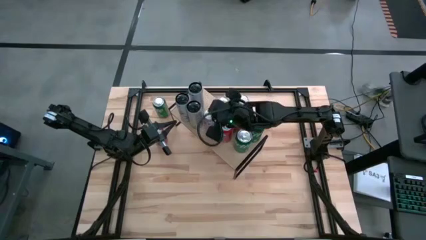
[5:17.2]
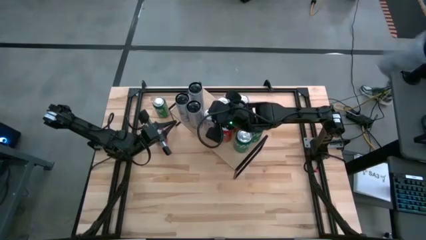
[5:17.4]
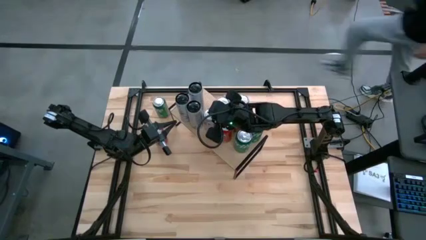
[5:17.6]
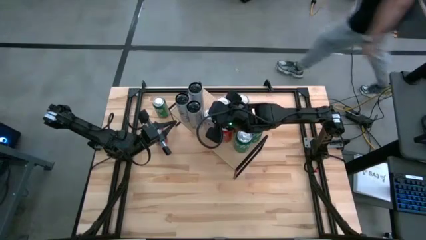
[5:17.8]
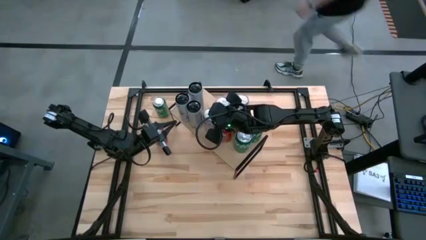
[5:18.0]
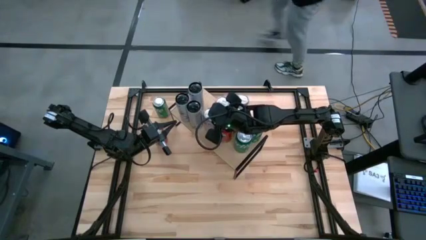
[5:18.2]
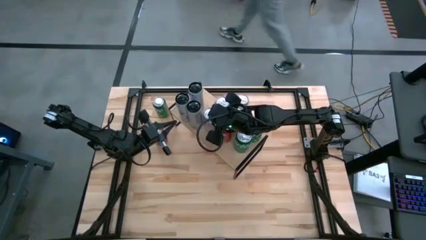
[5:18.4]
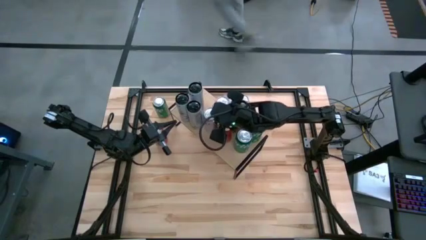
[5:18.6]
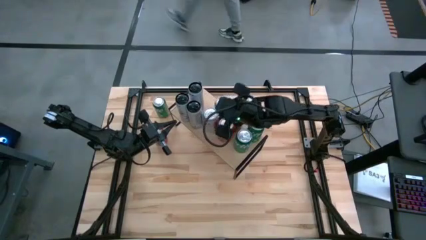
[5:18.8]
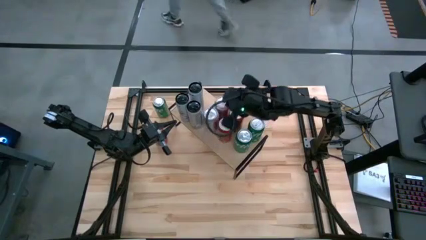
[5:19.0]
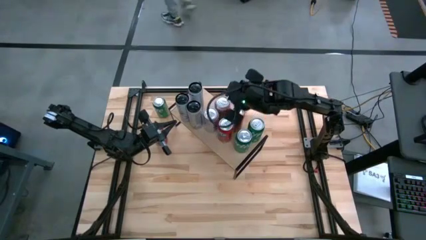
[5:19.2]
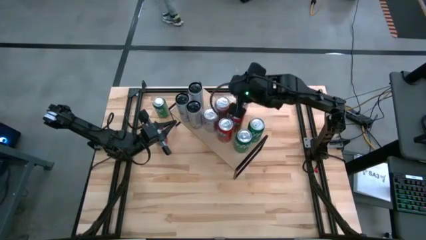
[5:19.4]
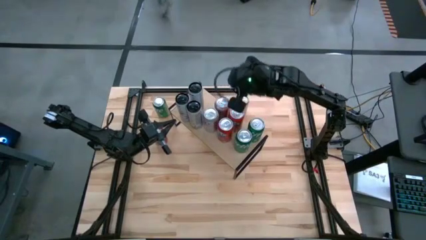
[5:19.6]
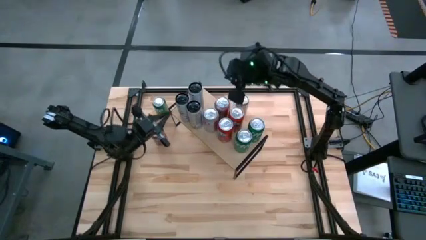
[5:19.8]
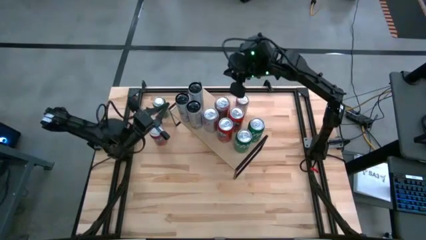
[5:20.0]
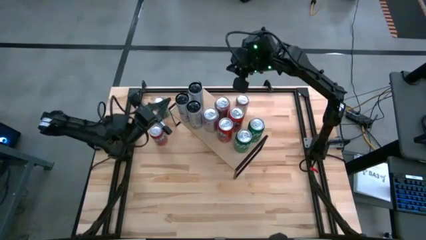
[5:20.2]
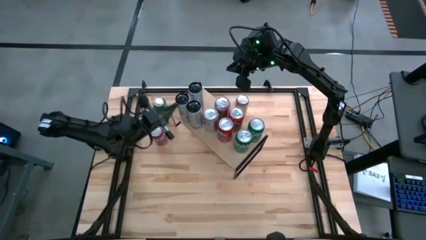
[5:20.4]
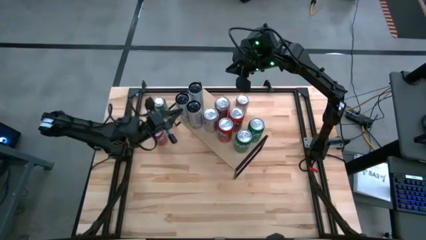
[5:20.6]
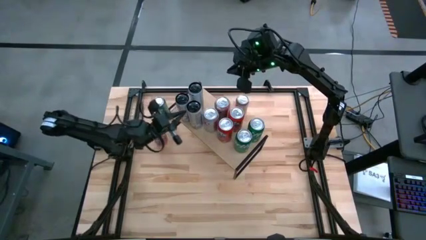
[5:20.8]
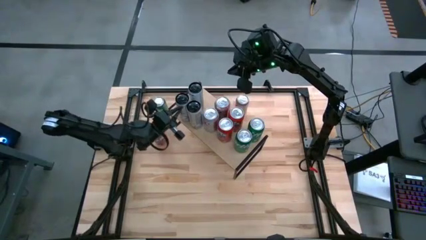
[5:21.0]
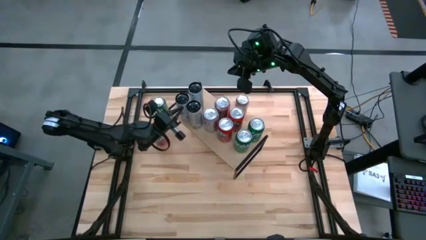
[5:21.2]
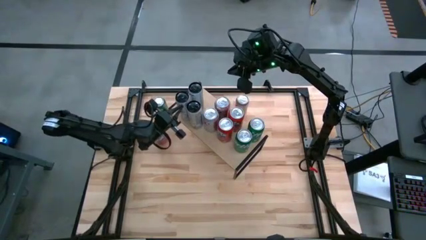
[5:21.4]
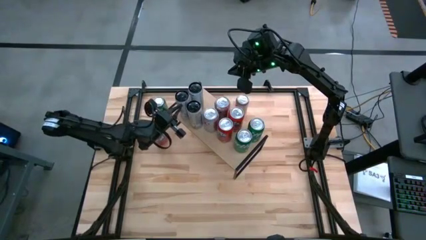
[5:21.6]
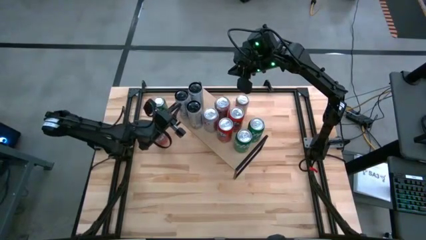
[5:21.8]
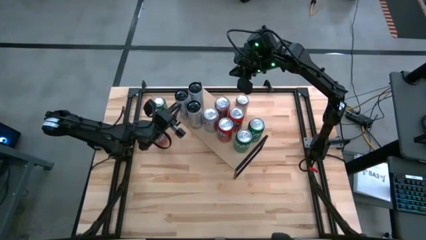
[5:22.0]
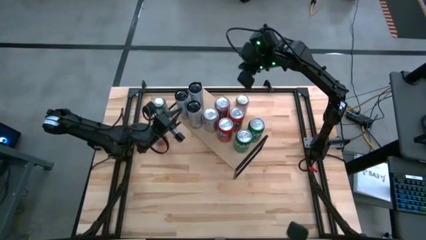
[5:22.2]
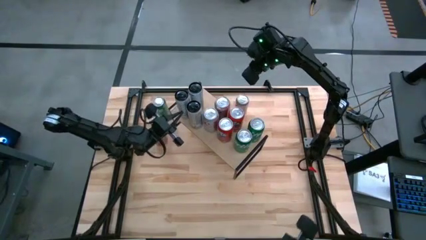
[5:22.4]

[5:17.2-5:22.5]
Task: Place canned beverage on shelf
Adjust the blue soda can

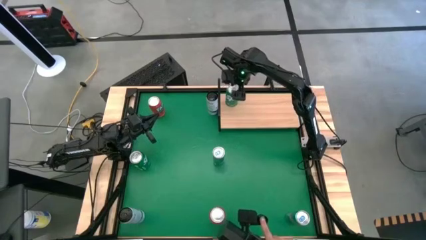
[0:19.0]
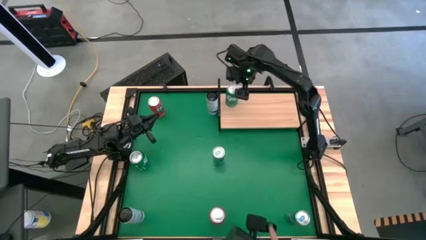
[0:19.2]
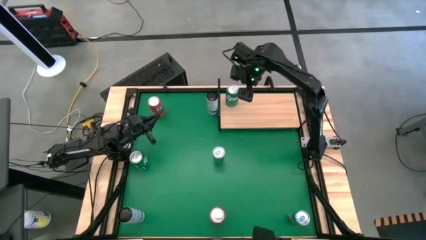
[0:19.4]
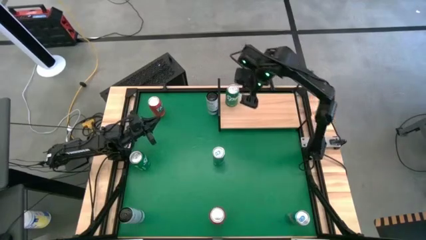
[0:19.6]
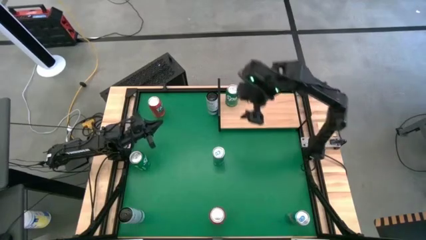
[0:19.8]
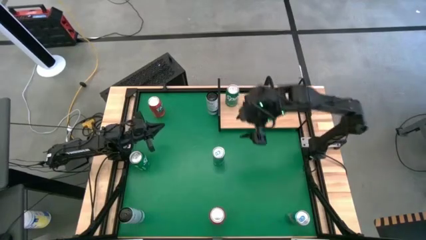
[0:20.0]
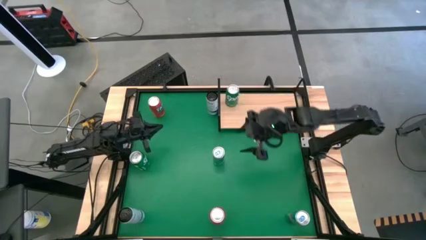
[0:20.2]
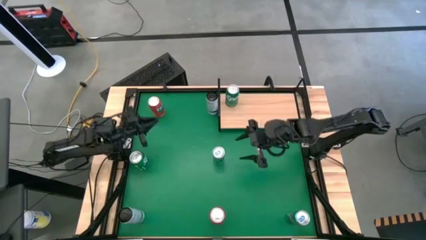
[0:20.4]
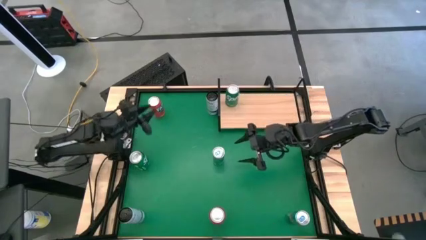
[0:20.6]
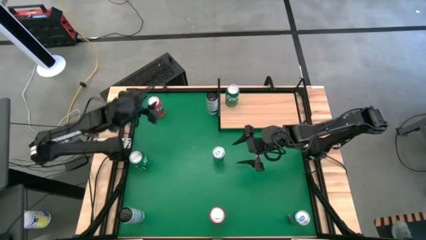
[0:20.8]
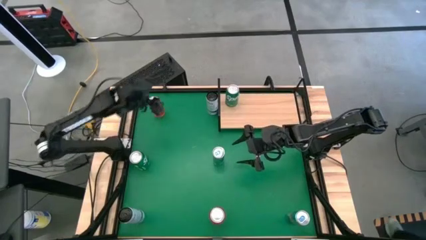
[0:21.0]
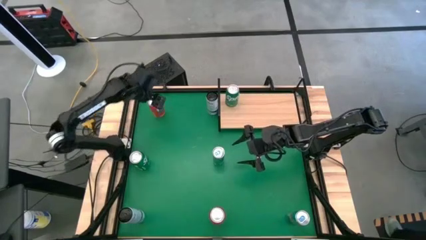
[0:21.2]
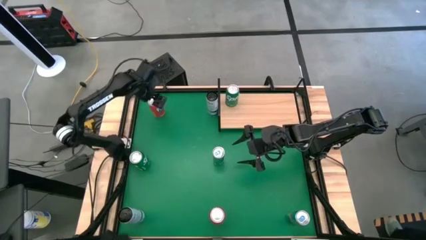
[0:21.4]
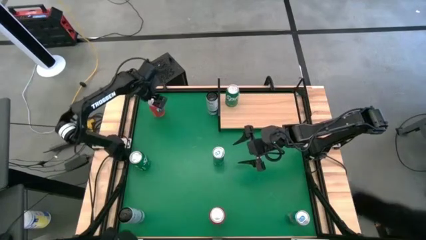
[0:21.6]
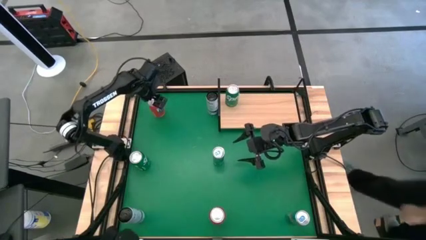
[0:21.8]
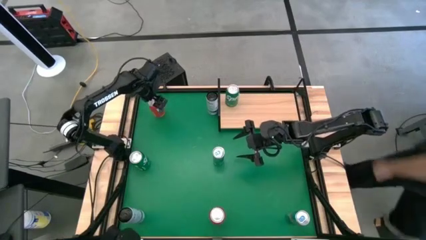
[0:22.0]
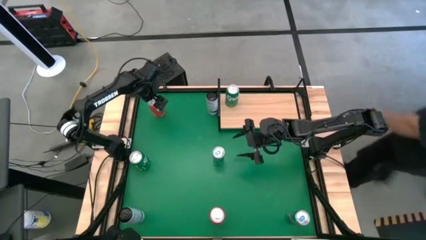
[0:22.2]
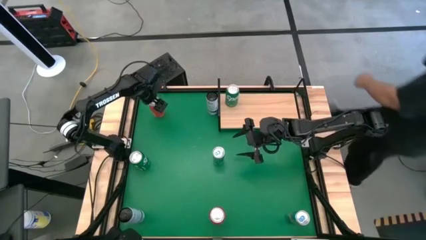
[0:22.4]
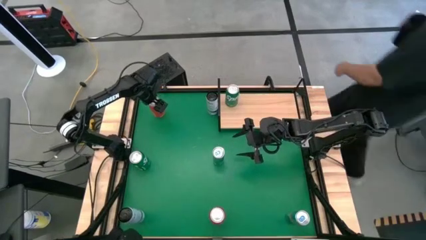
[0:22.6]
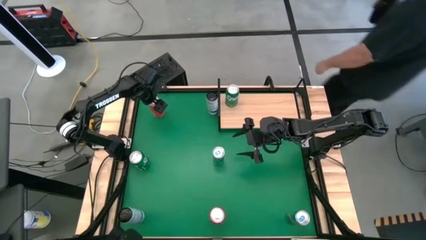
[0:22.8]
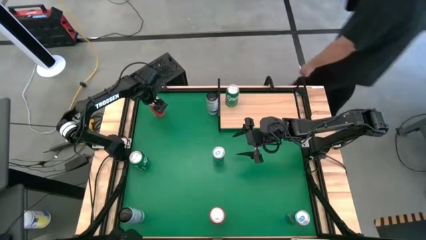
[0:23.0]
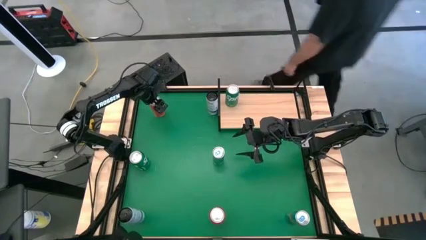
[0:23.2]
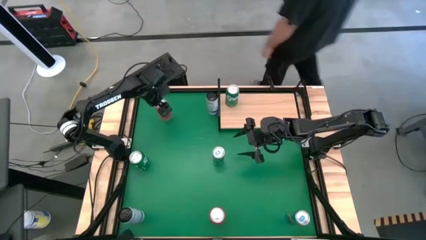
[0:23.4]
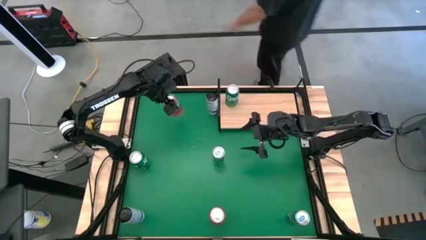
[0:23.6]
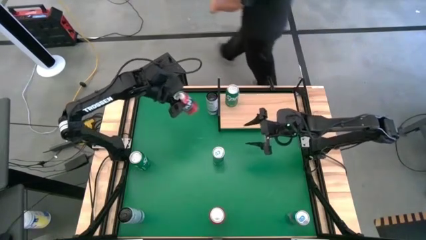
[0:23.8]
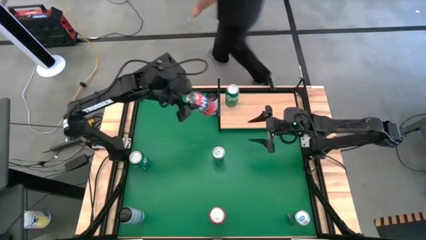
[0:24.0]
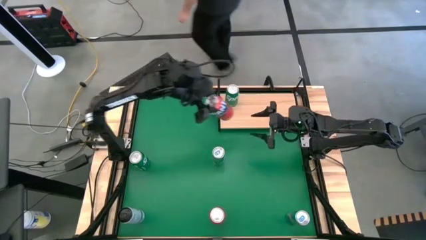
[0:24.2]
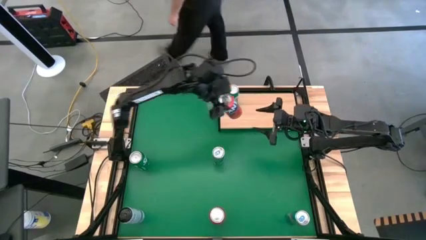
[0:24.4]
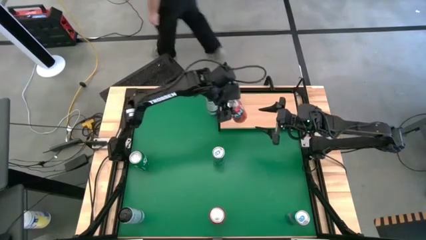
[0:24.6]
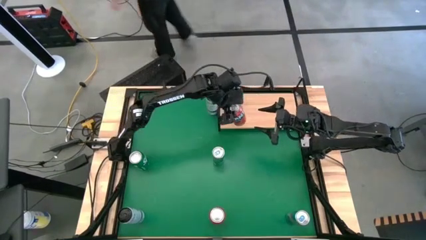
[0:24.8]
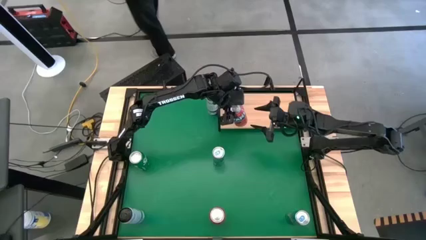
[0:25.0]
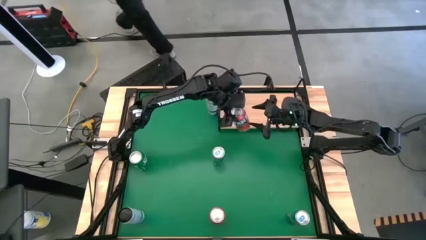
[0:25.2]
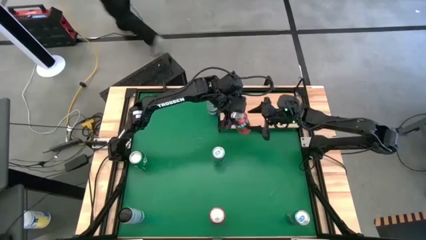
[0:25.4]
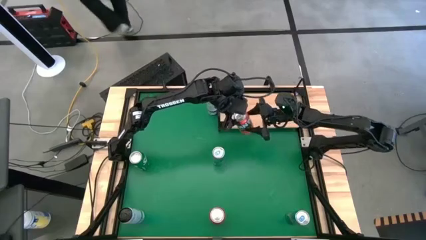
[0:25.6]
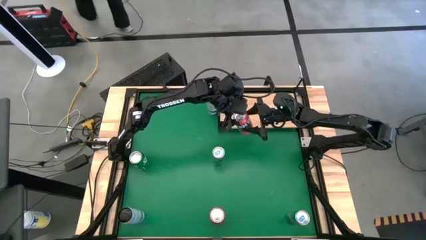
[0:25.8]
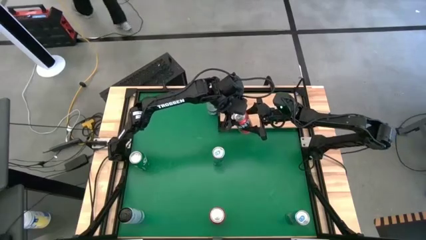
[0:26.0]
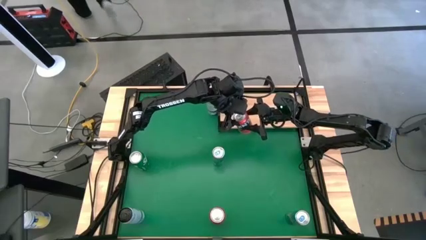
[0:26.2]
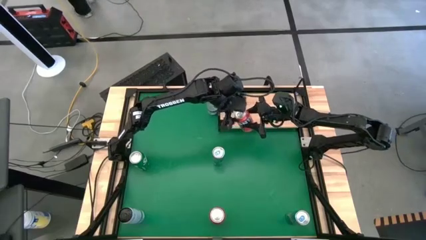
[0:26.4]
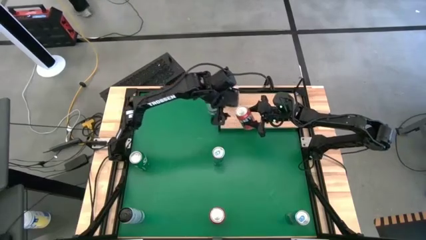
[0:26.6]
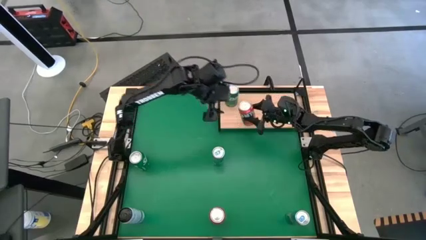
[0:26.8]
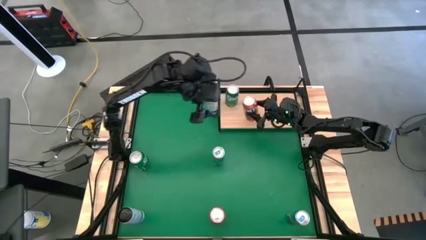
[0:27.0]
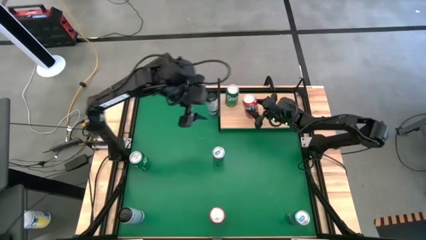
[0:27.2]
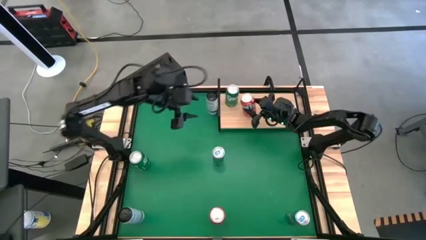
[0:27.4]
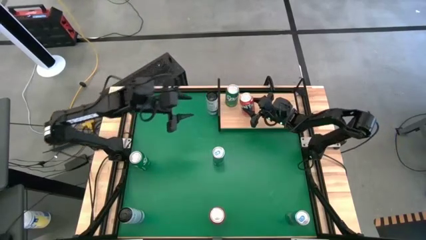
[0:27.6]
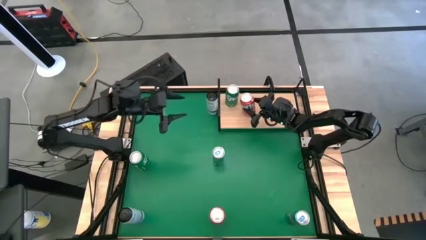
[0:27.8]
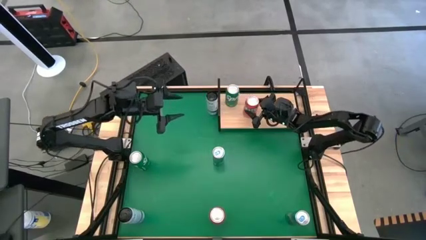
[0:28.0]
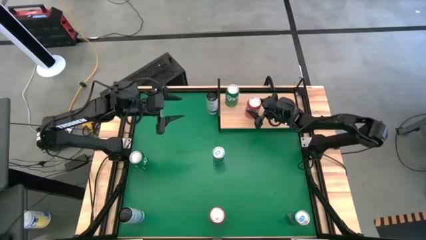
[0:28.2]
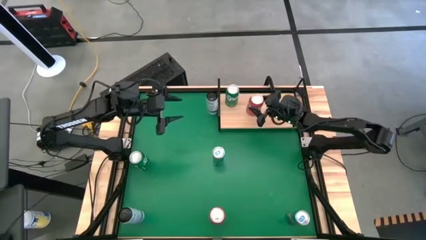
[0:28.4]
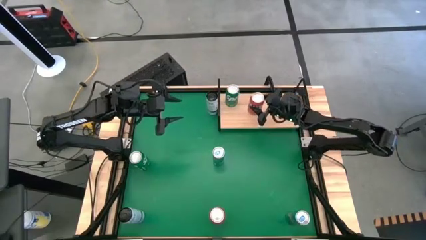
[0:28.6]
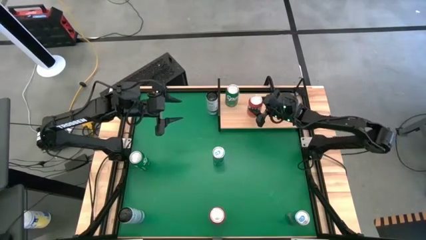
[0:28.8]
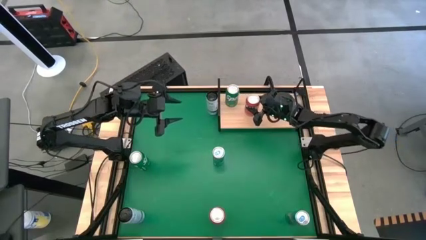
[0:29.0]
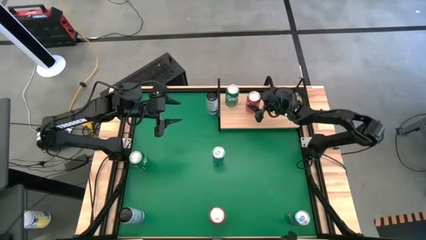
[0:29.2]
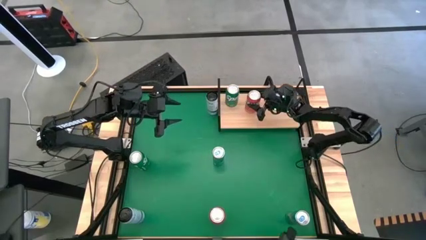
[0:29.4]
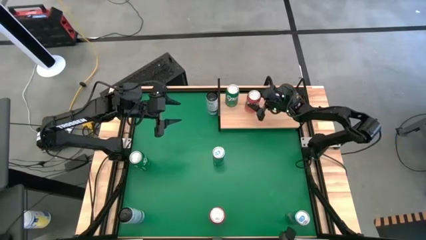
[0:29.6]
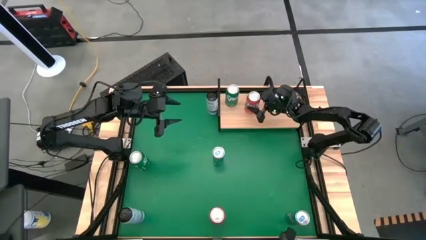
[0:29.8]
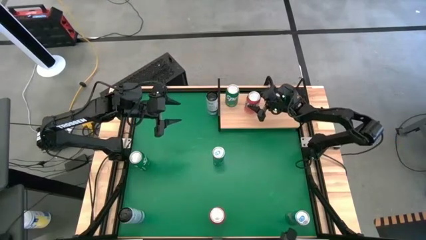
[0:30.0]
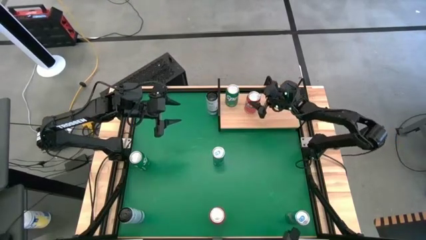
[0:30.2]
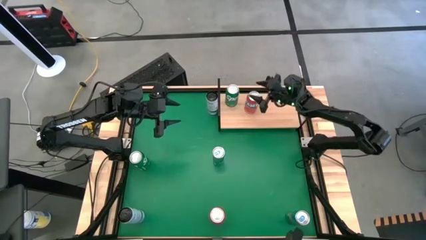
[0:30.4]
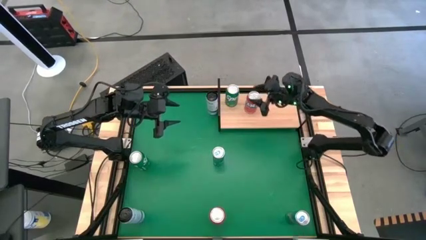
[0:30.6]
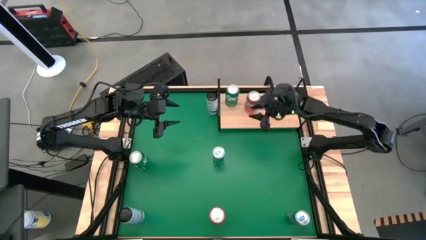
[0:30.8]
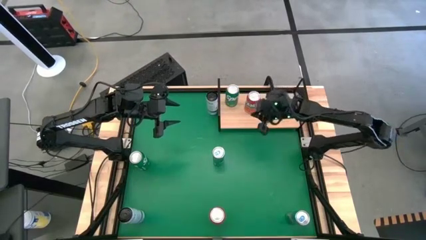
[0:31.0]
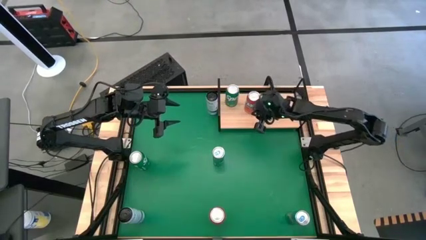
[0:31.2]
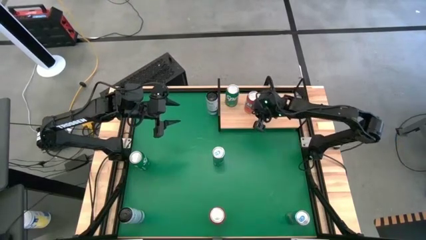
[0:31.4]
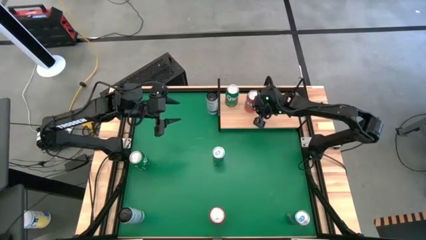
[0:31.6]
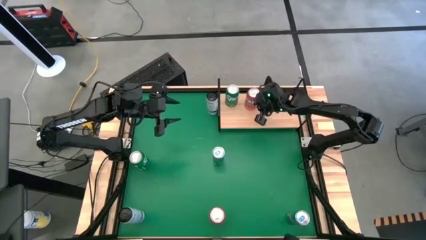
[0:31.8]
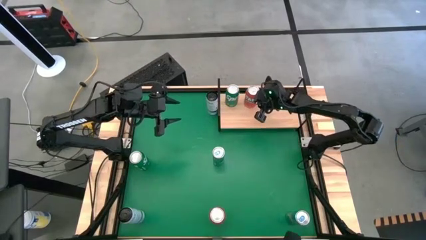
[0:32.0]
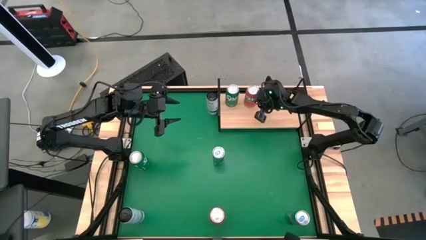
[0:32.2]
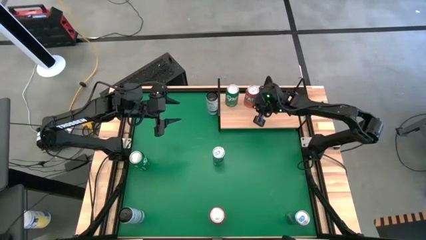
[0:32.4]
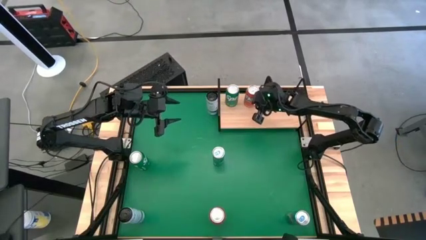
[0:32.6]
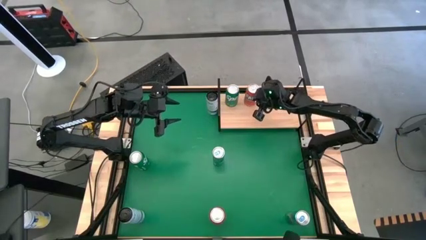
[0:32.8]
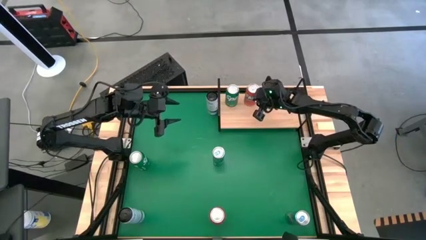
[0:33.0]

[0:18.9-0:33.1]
Task: Place canned beverage on shelf
Put the top orange soda can on the shelf
